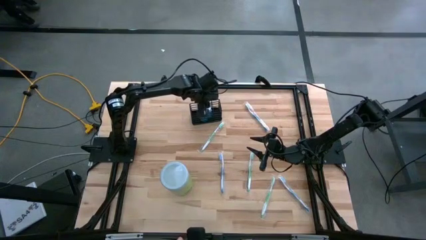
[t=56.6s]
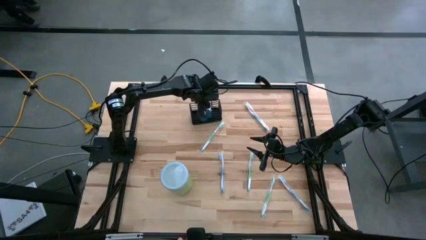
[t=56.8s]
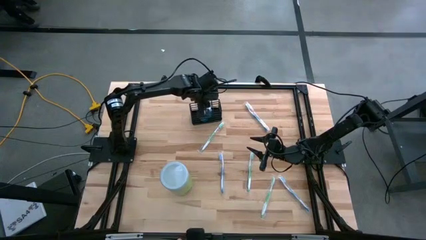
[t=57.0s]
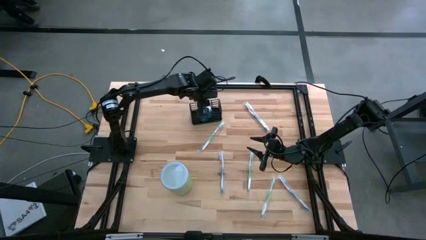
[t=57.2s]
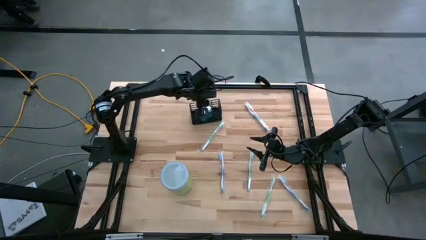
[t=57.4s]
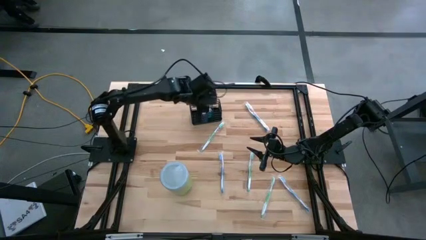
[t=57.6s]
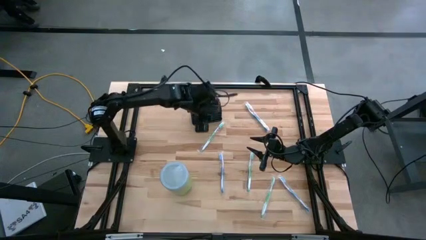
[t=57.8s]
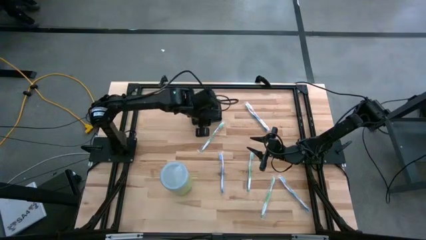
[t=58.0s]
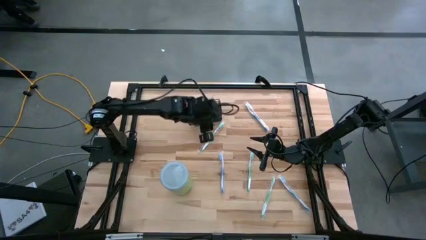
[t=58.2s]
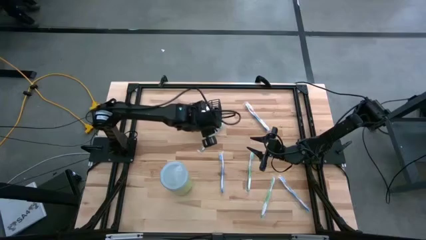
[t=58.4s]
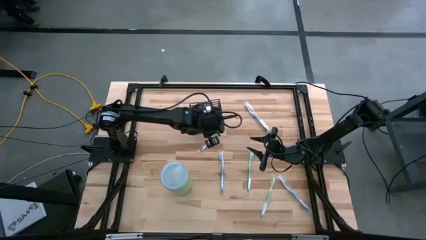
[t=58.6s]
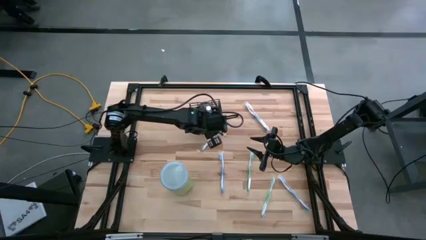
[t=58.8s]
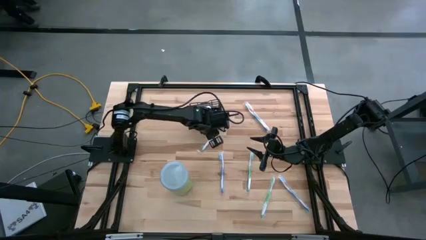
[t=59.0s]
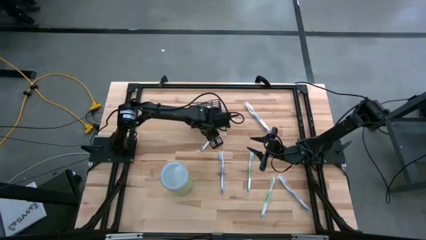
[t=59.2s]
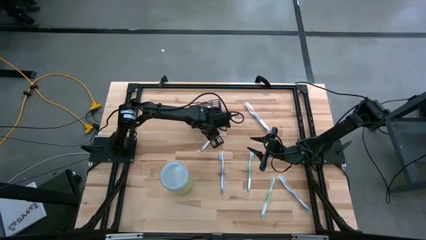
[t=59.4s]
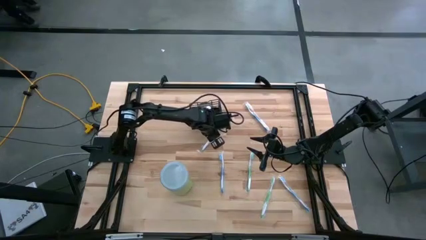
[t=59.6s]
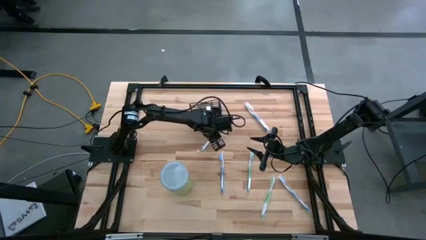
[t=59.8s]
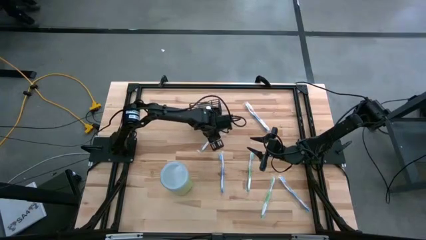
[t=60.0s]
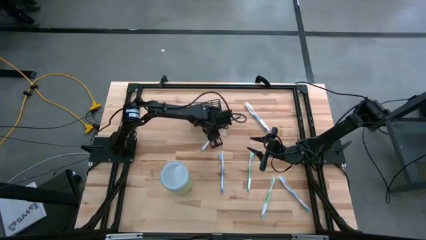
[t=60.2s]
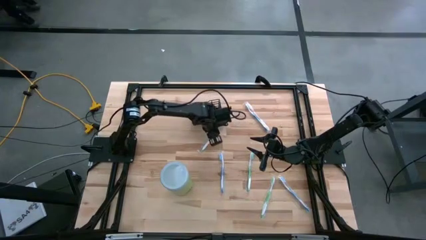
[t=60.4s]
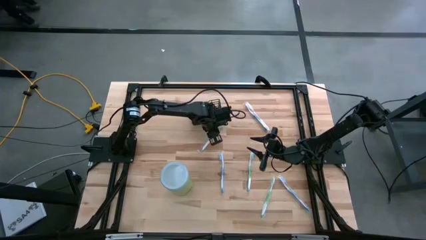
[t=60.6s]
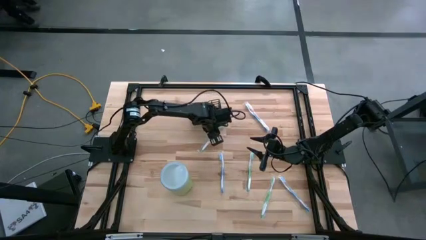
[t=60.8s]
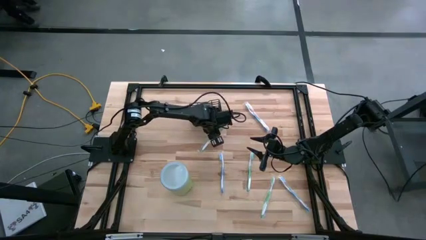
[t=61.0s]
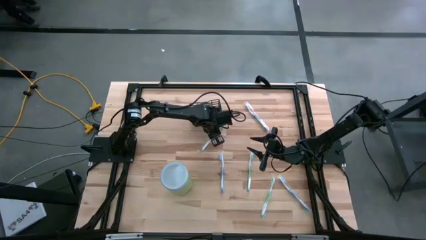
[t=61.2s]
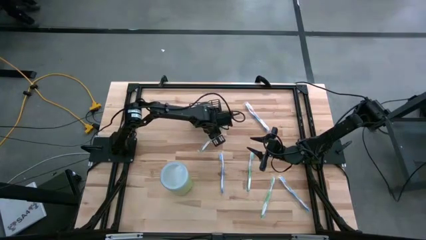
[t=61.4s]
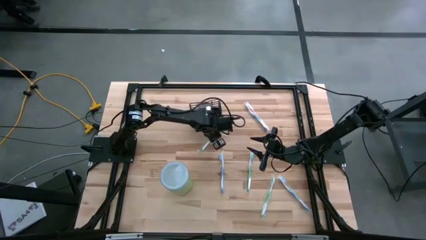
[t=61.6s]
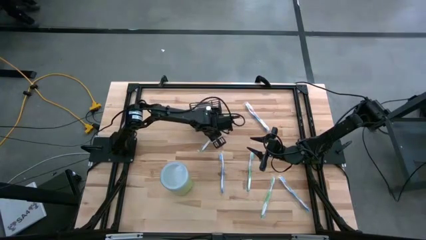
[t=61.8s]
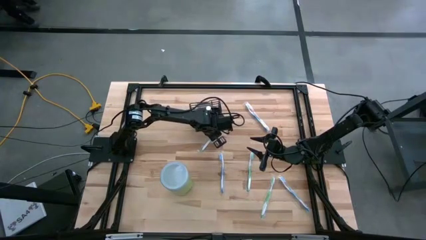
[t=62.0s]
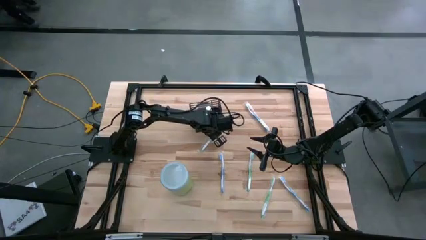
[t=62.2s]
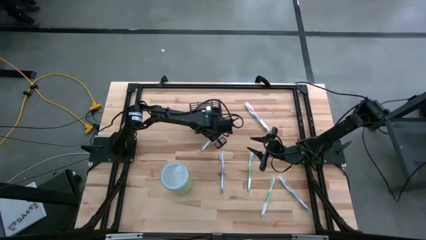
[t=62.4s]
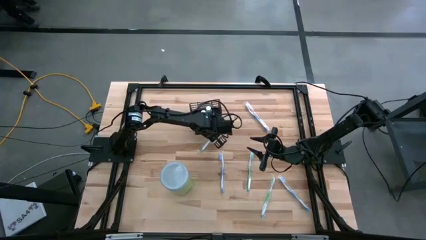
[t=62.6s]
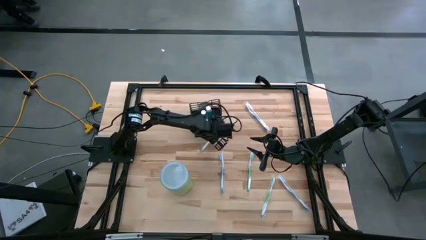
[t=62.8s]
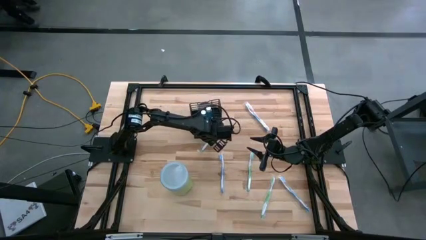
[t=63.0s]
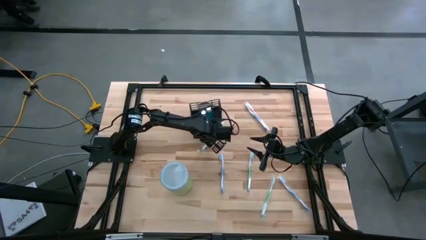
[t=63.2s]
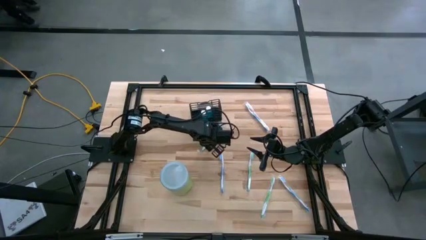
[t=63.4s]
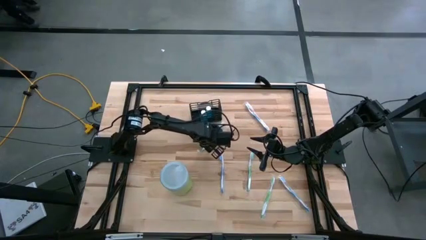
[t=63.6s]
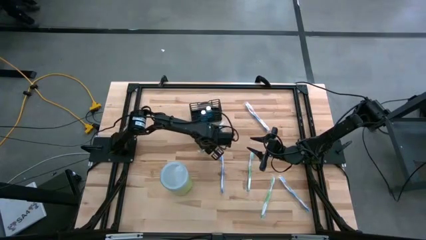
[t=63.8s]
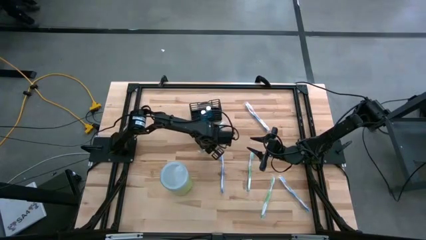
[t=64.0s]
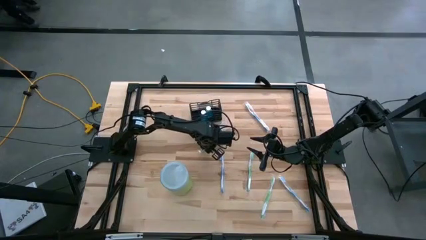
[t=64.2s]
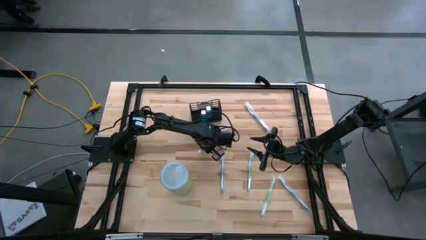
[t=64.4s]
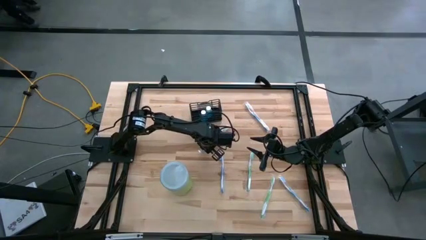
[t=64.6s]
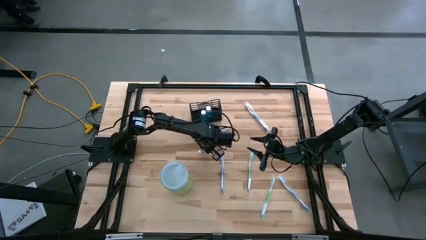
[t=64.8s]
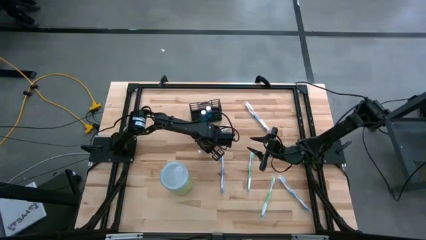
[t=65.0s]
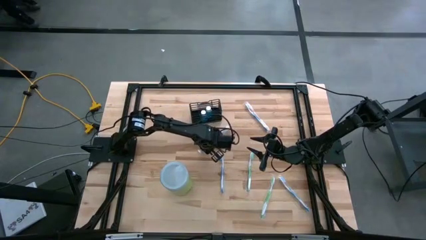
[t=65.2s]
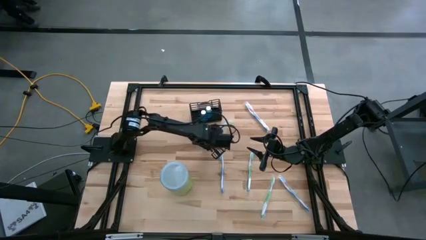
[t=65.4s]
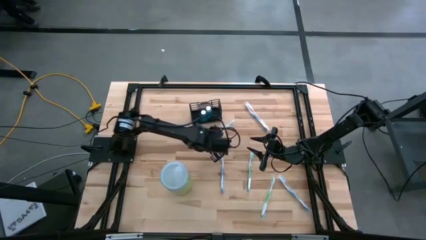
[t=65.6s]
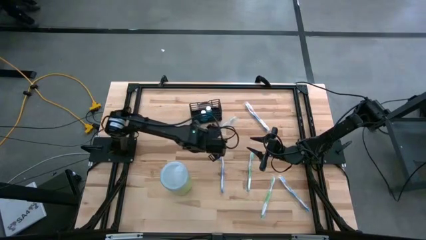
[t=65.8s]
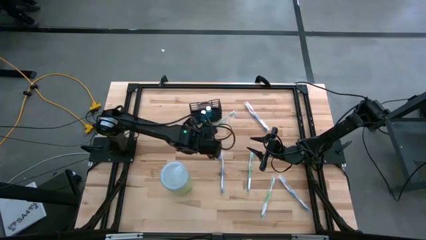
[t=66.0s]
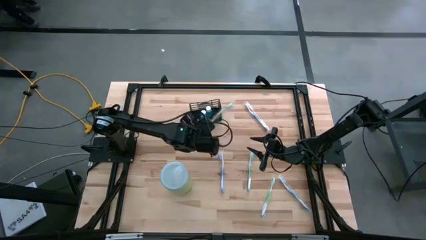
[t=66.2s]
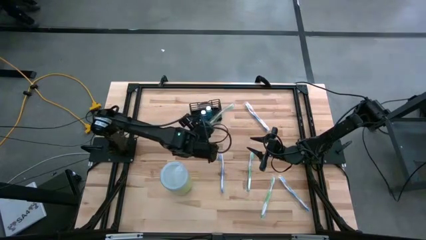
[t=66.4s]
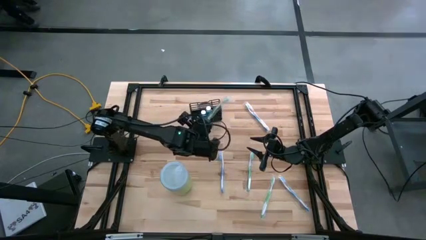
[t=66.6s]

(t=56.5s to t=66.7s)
Task: Pick & Place toothbrushing station
Put the top green toothbrush into the black mesh mesh organizer

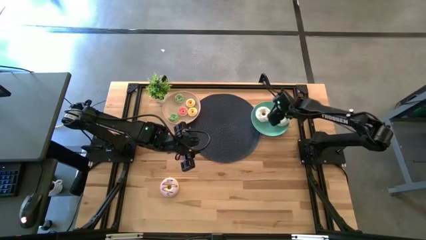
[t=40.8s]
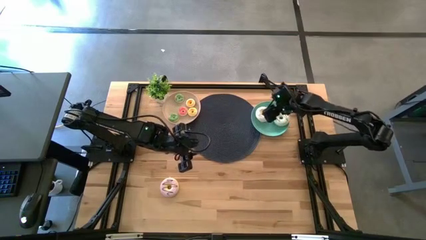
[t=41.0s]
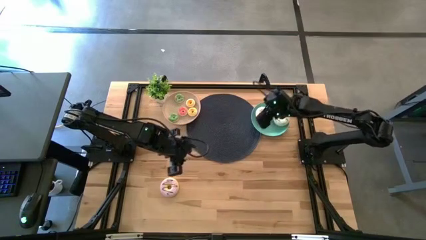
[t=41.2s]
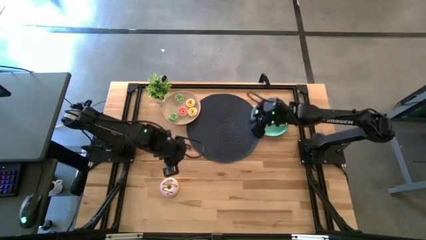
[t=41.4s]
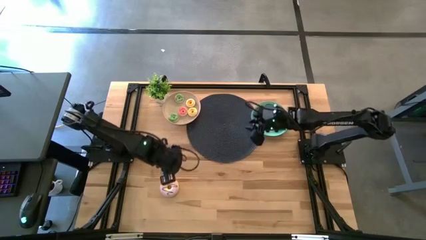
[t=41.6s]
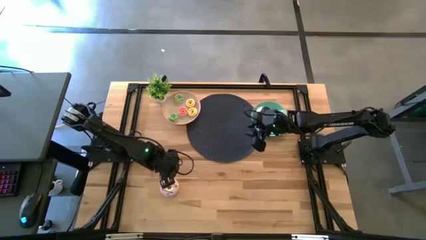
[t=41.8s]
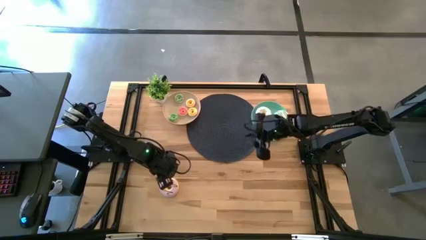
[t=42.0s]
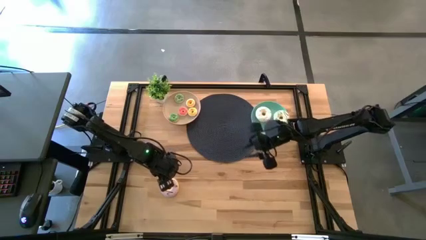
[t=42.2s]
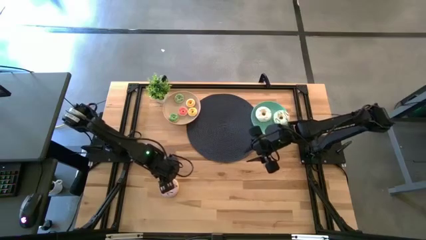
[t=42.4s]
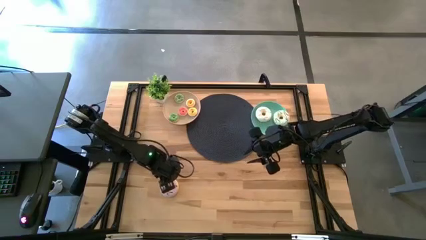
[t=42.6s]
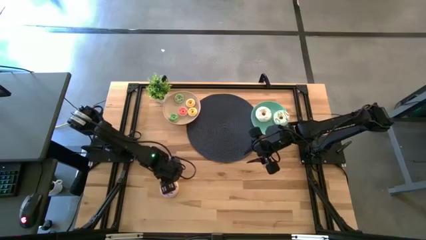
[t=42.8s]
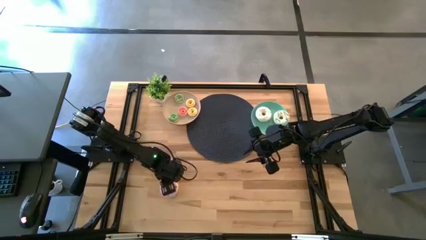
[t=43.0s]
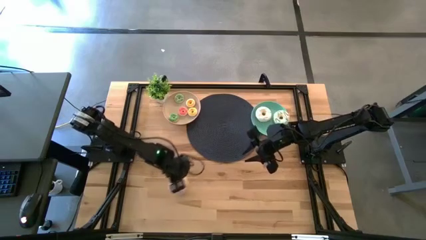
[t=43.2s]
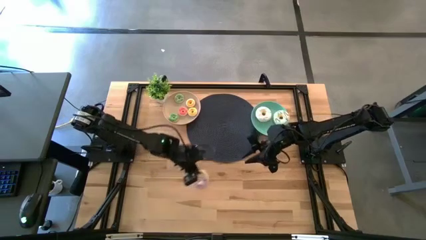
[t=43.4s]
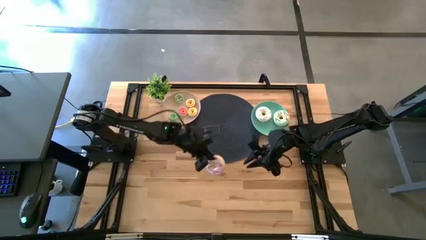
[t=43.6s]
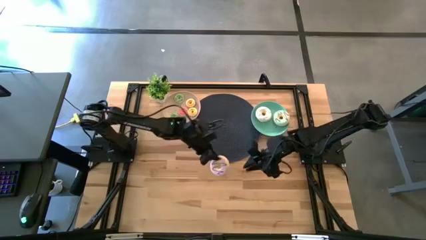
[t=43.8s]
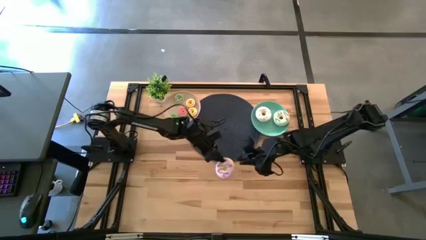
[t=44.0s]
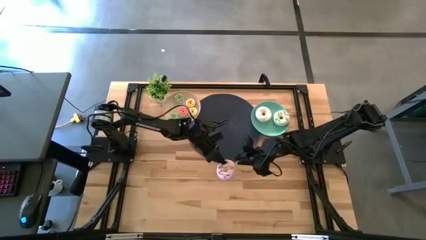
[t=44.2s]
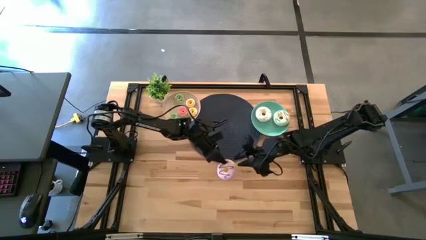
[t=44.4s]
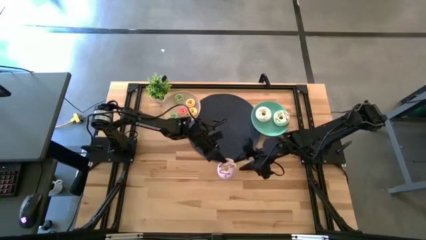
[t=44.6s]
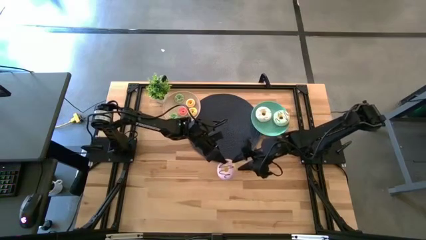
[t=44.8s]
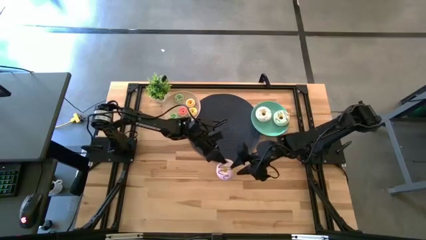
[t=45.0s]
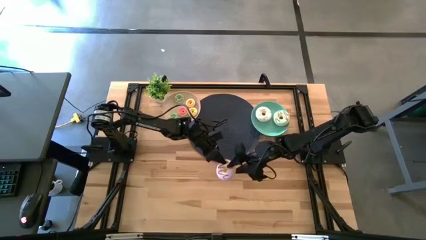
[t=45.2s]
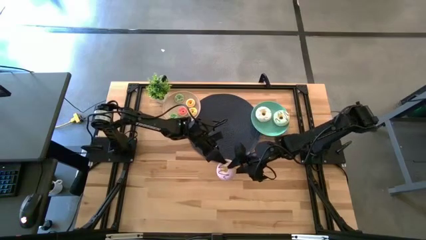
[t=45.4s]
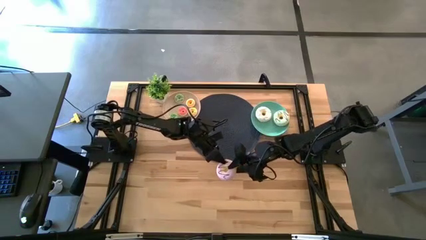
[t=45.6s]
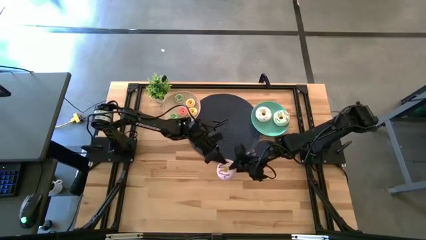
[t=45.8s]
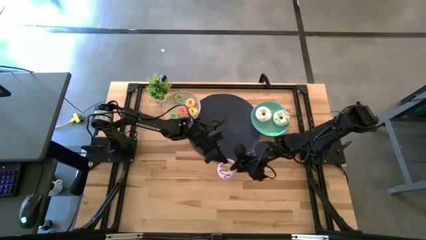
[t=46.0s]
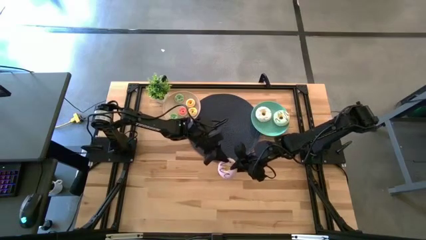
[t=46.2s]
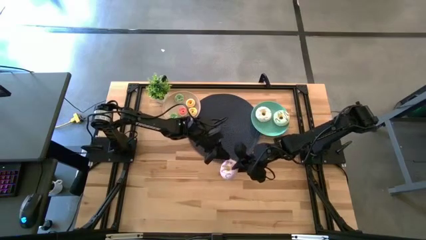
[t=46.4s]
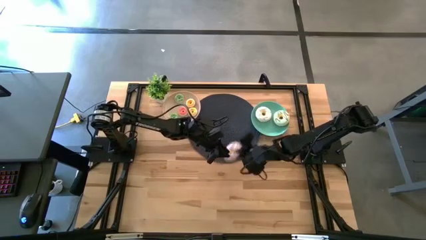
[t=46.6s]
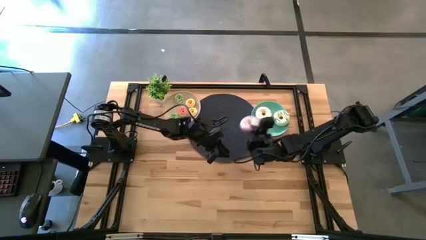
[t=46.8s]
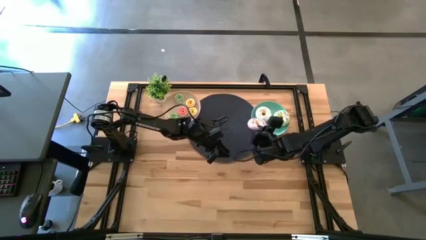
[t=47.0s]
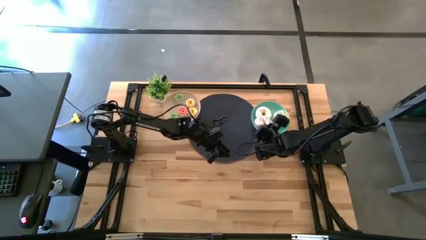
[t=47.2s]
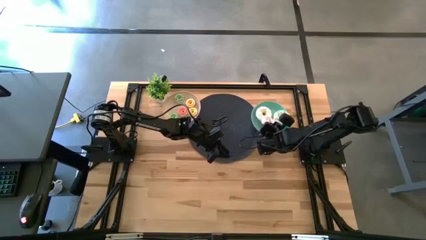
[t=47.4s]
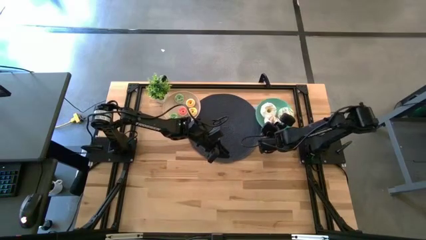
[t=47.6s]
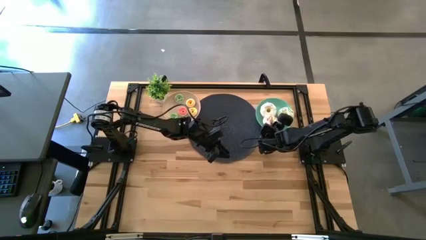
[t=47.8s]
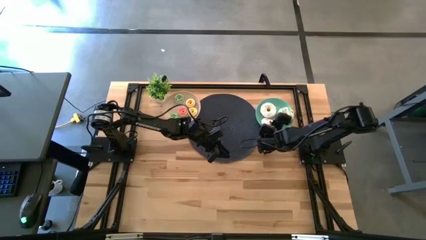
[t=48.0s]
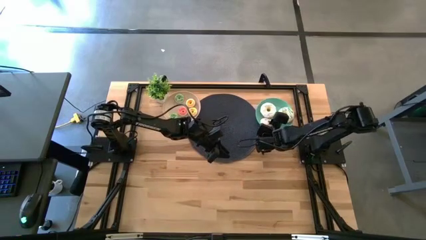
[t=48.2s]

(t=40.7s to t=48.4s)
Task: Pick & Place donuts
Put the large pink donut on the green plate
